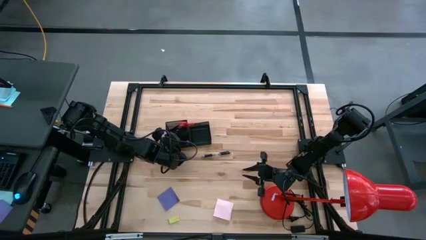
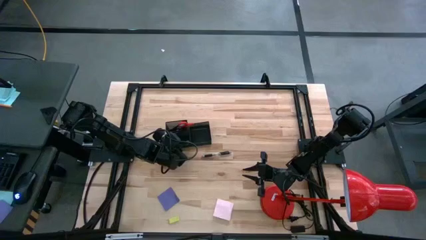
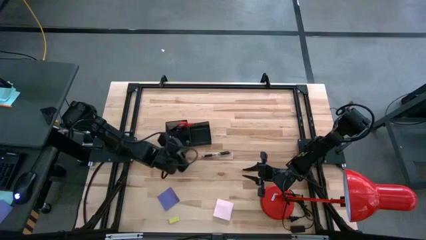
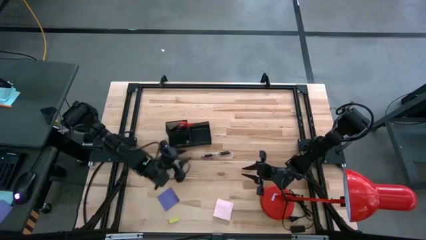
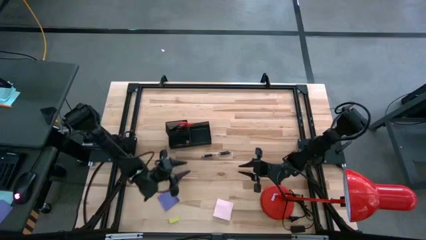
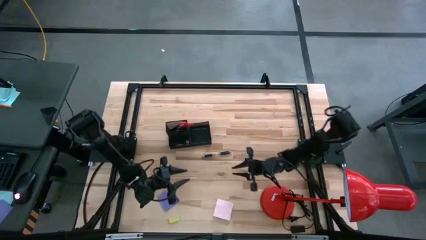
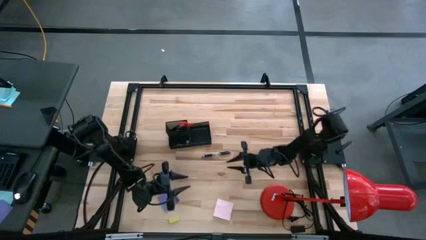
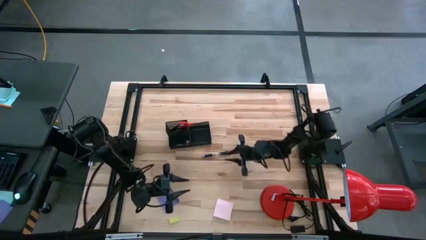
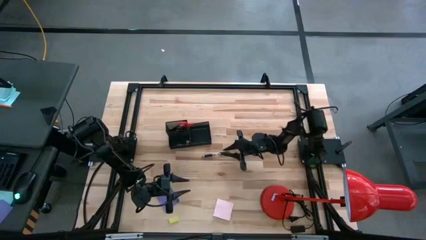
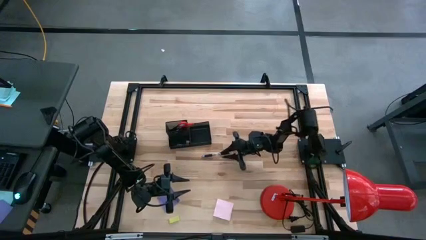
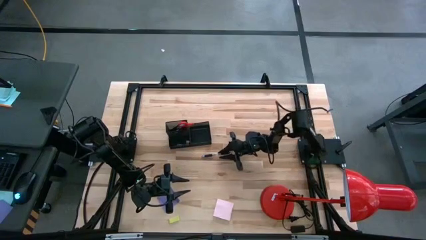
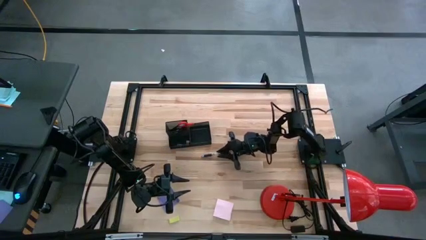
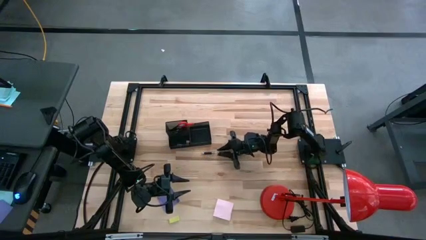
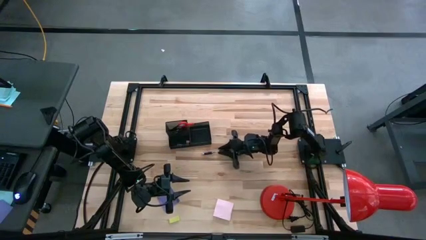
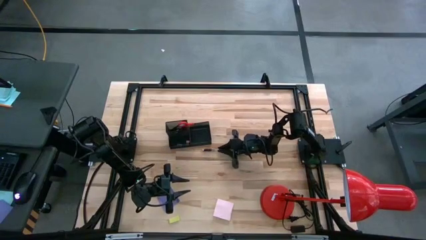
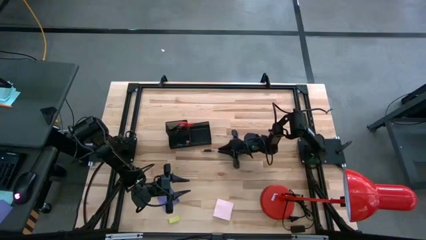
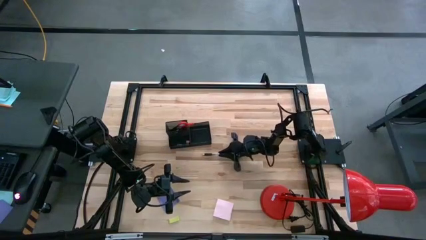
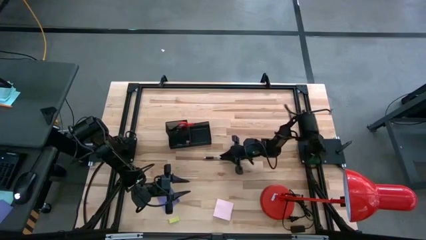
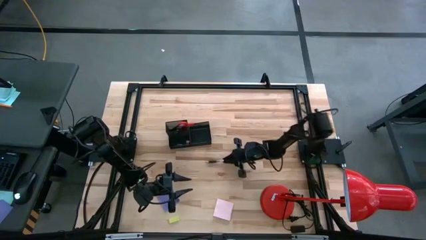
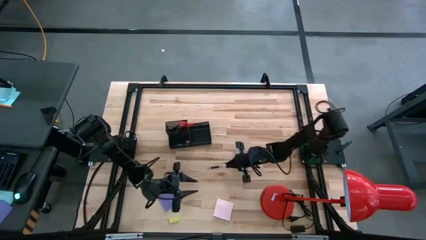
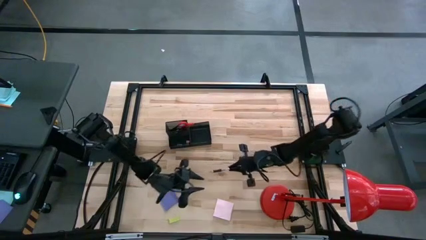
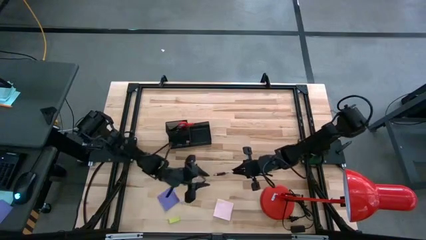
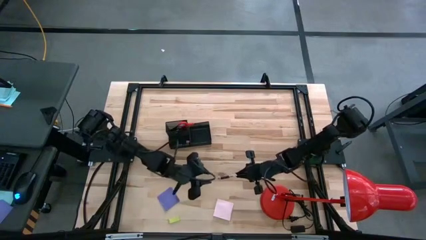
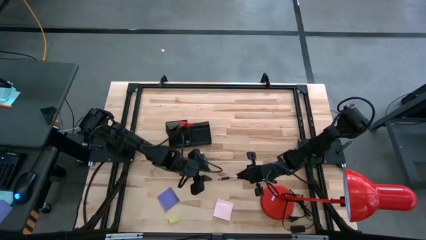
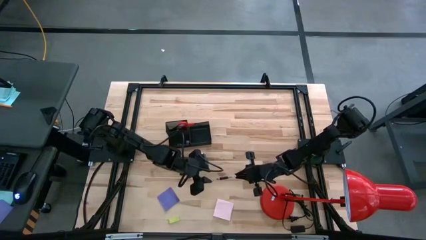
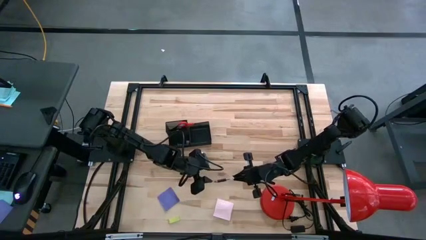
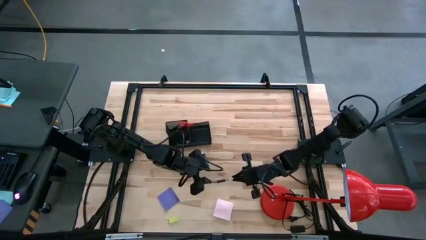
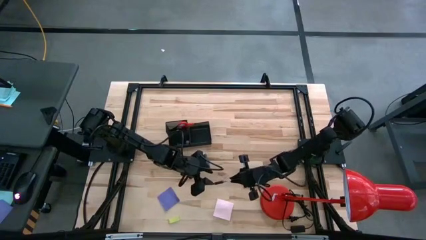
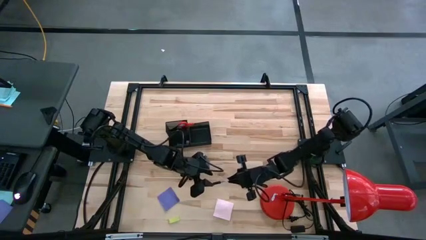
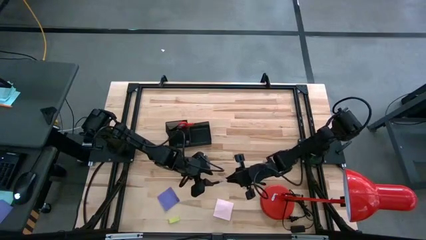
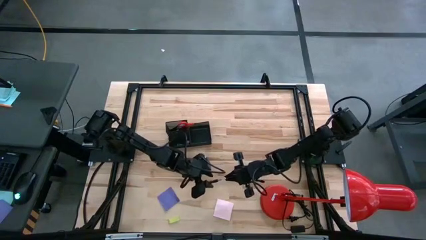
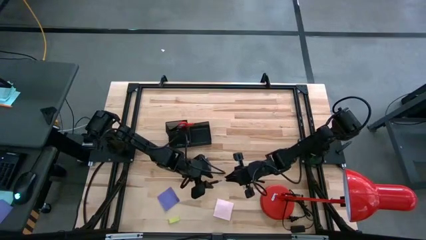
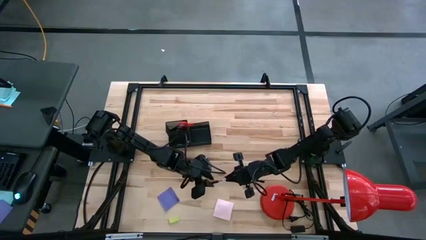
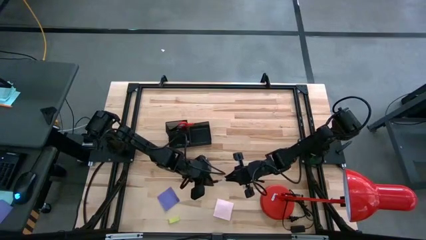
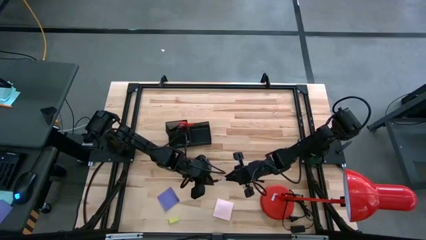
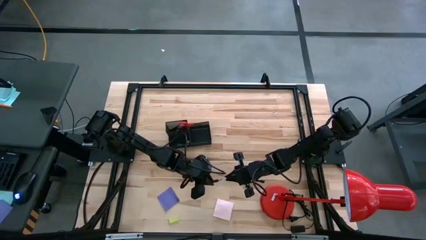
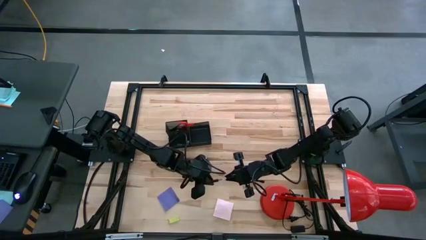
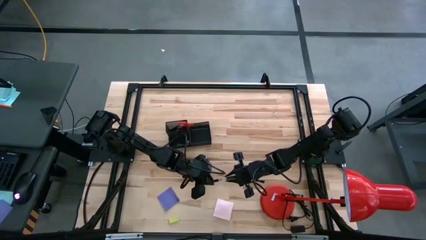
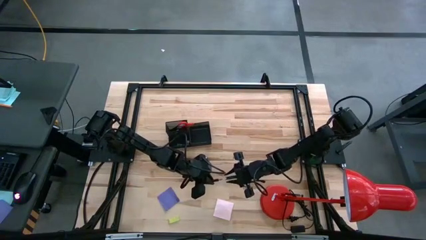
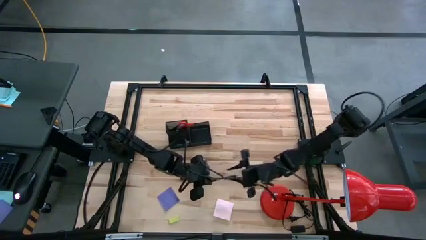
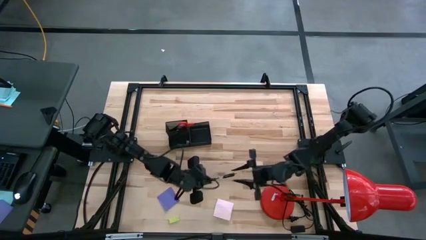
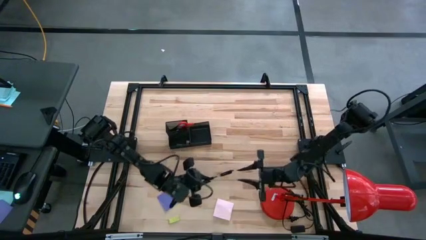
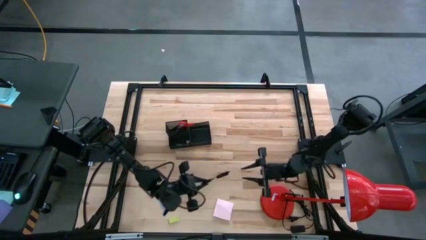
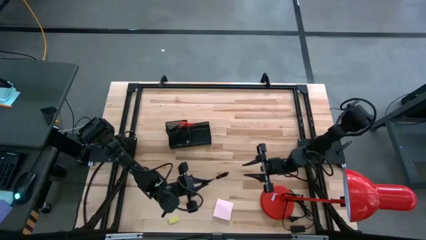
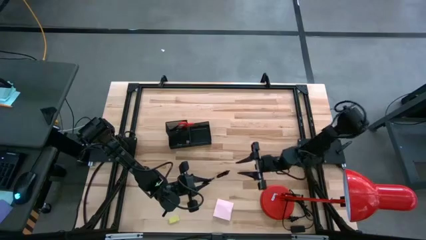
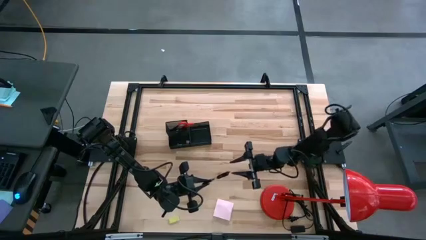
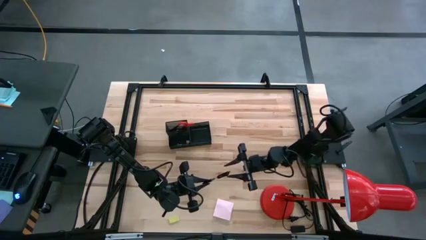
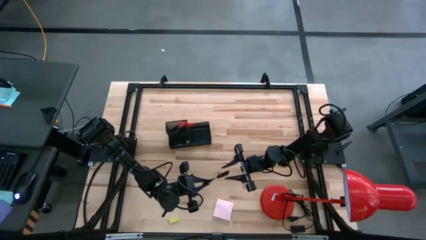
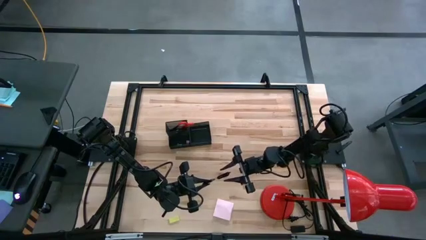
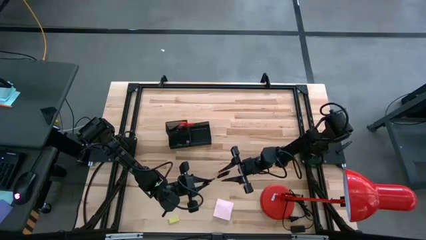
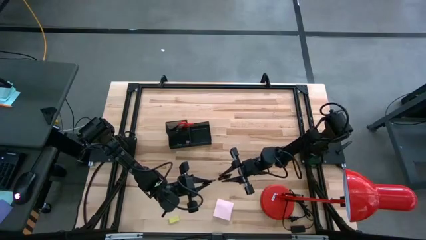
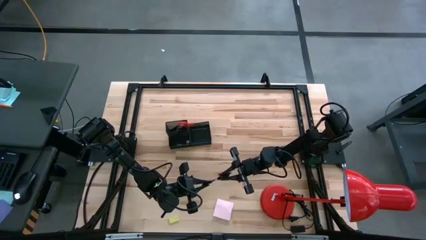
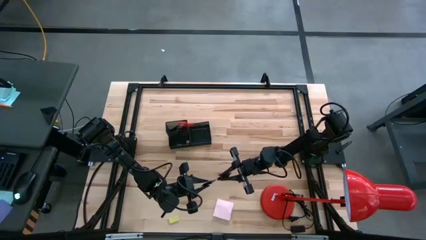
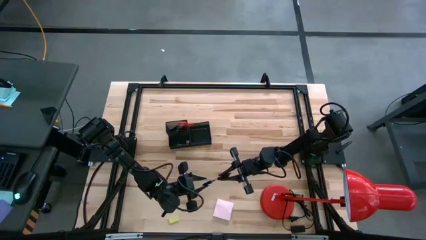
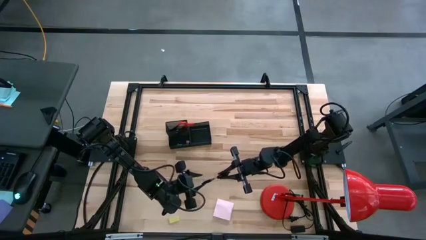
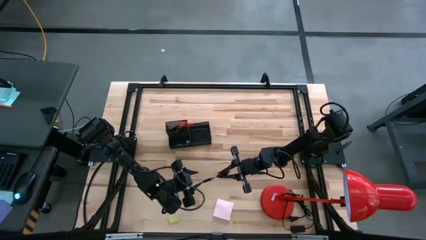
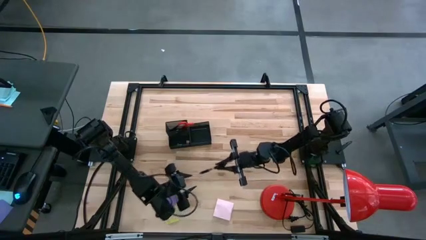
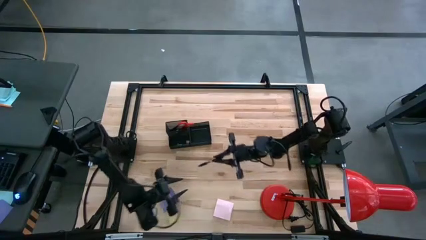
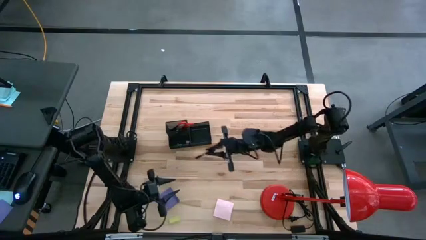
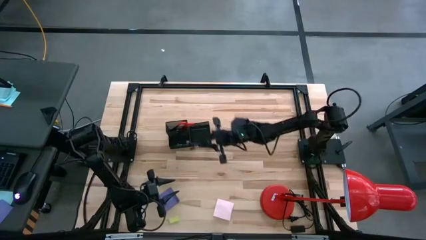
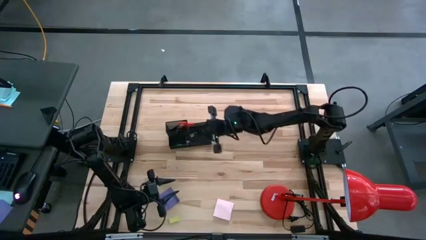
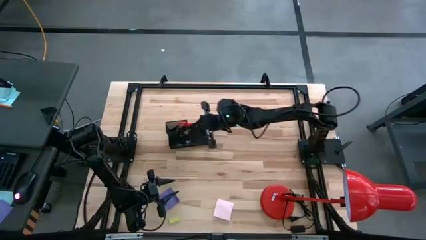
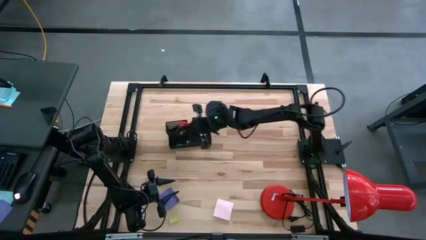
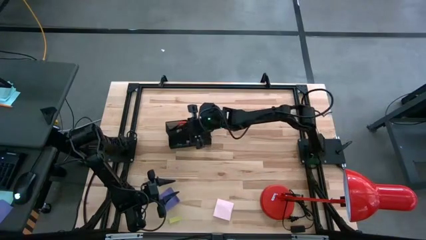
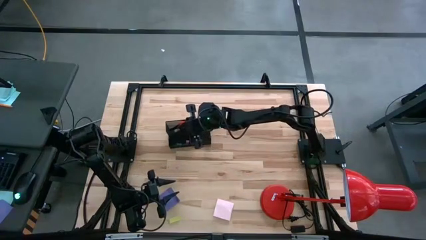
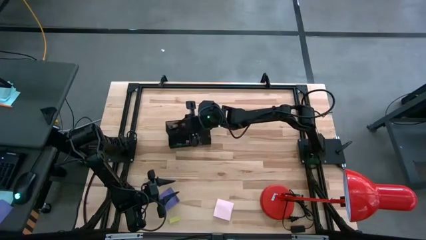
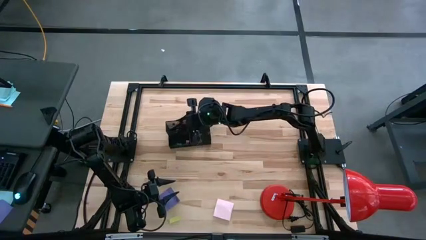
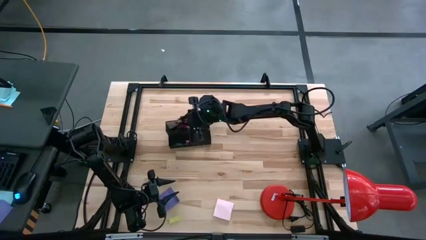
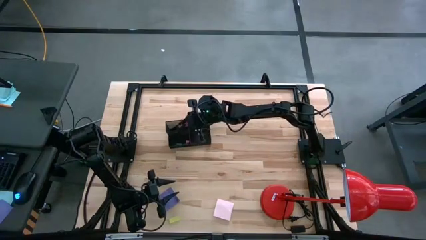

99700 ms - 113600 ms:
Task: Pick and place office supplies into organizer
Put the transparent pen into the desk organizer
